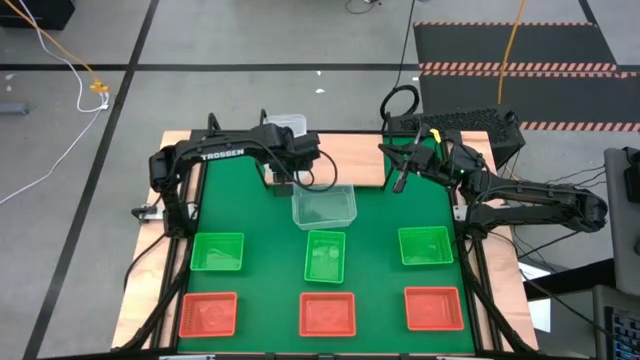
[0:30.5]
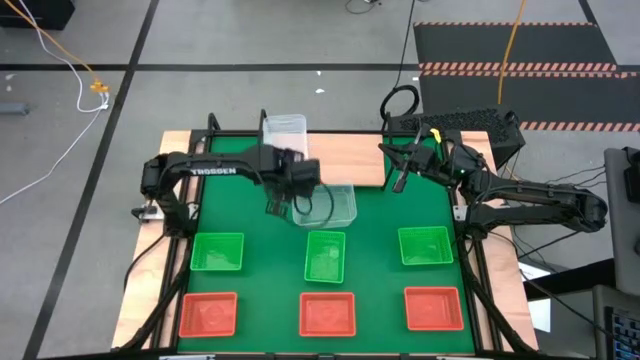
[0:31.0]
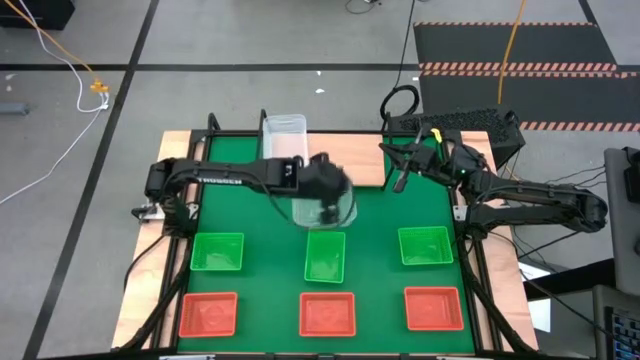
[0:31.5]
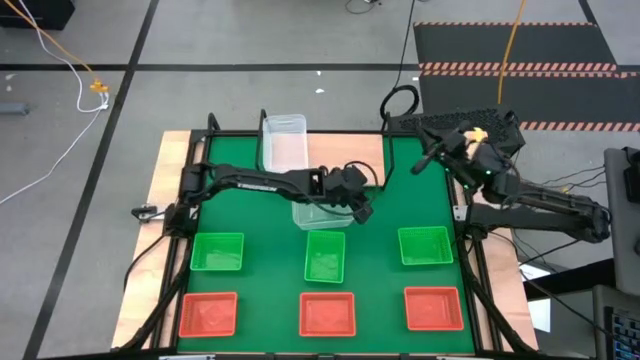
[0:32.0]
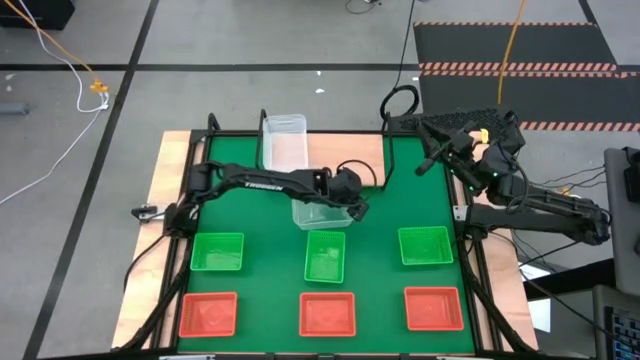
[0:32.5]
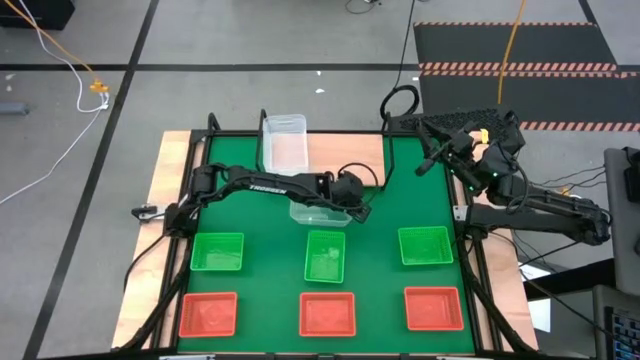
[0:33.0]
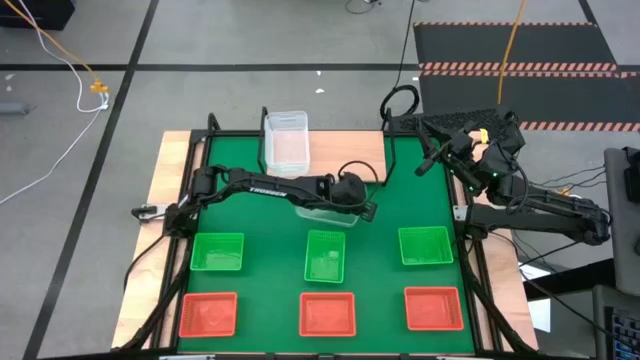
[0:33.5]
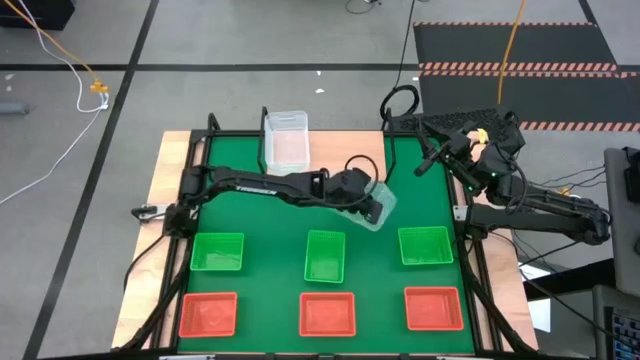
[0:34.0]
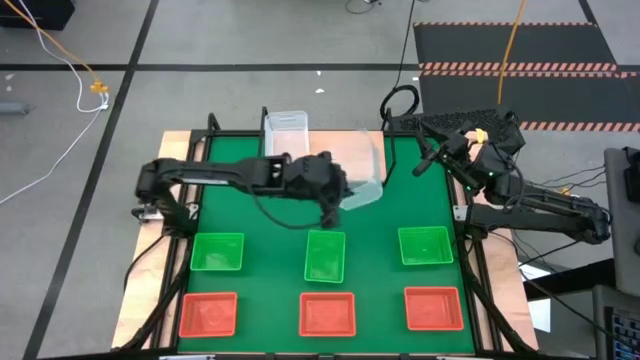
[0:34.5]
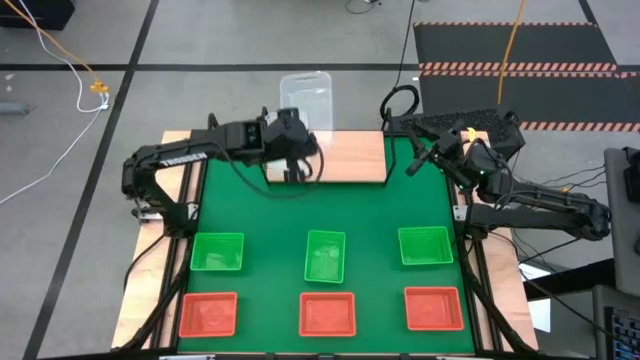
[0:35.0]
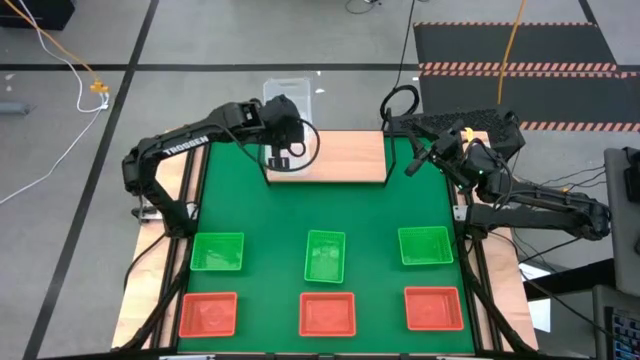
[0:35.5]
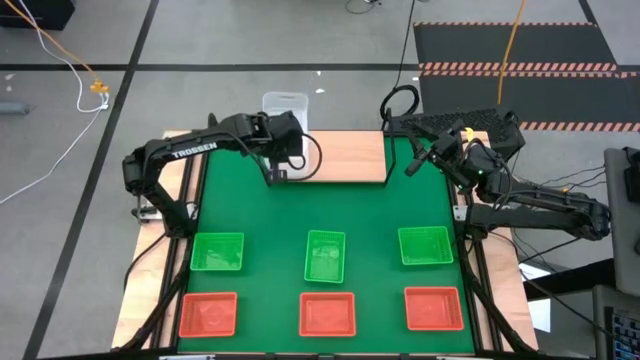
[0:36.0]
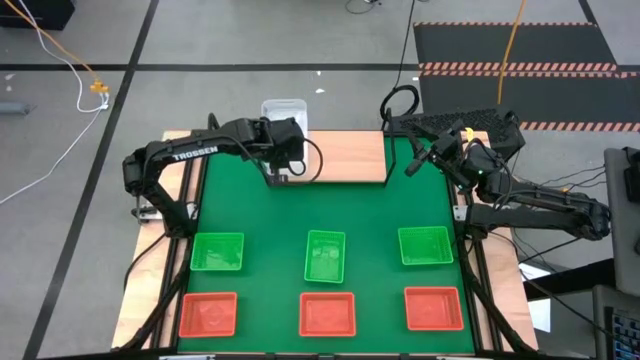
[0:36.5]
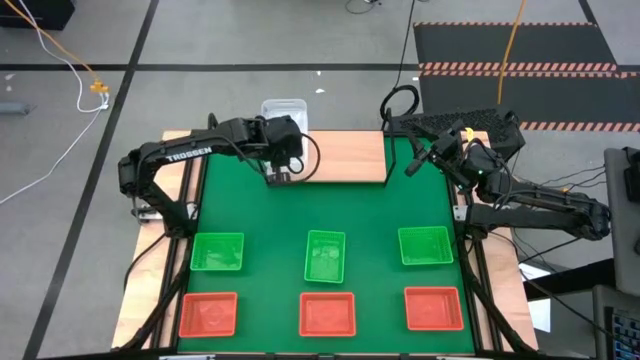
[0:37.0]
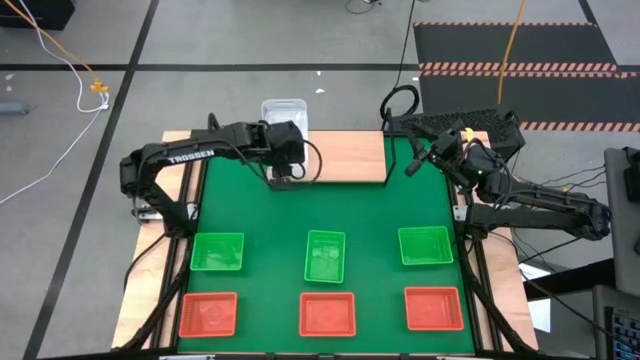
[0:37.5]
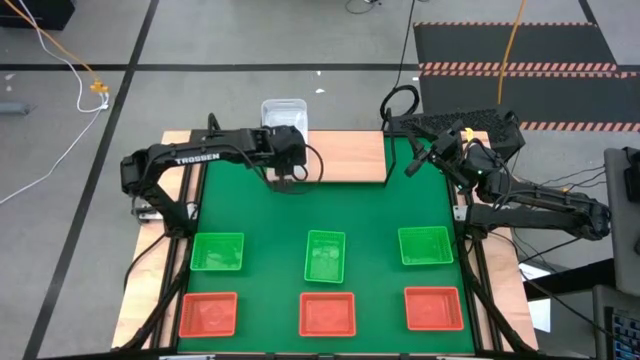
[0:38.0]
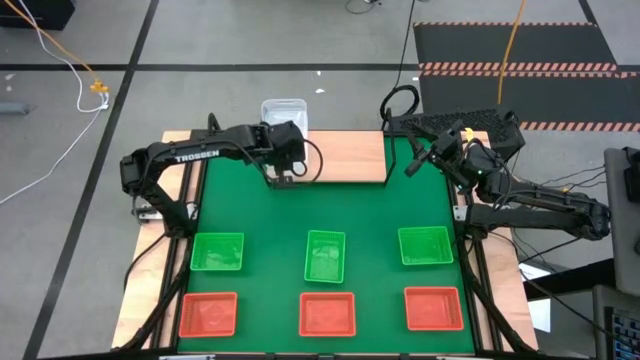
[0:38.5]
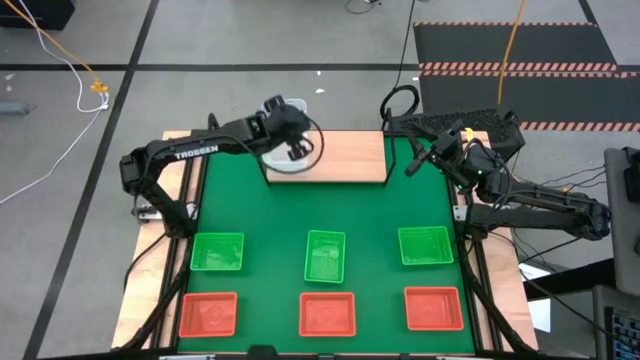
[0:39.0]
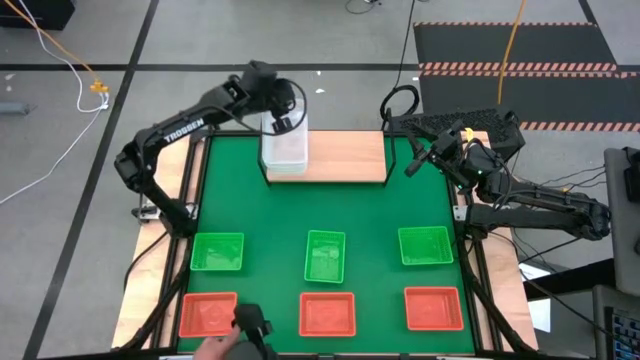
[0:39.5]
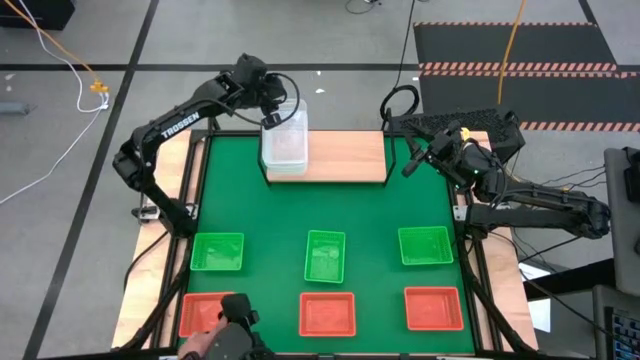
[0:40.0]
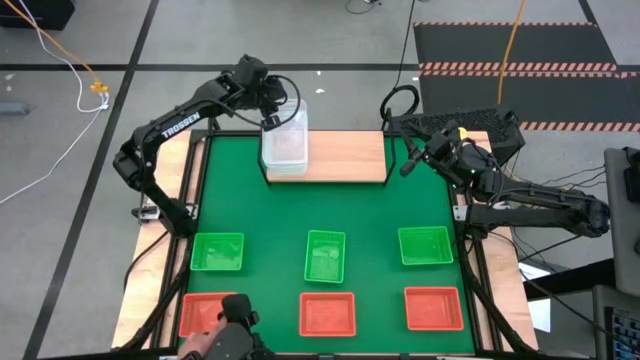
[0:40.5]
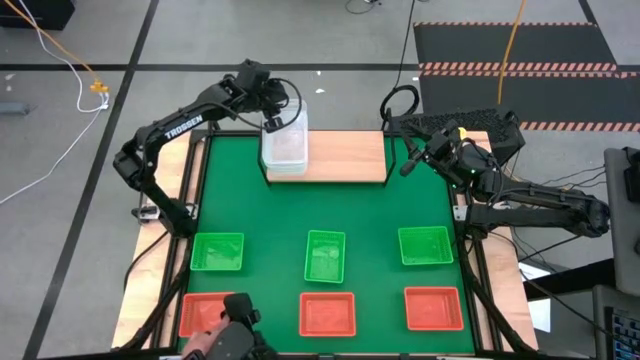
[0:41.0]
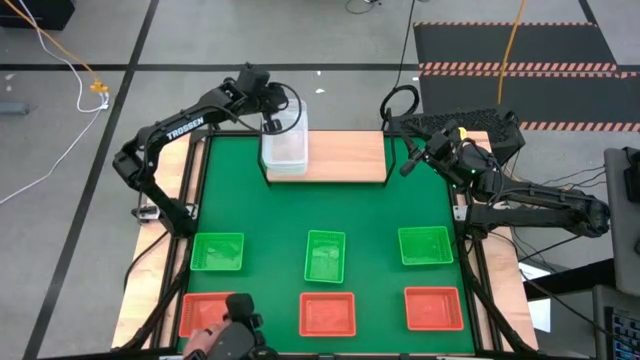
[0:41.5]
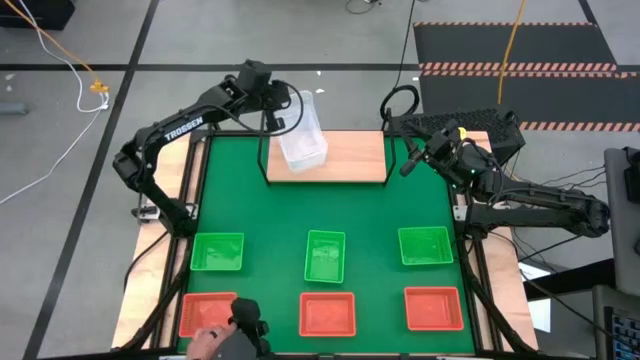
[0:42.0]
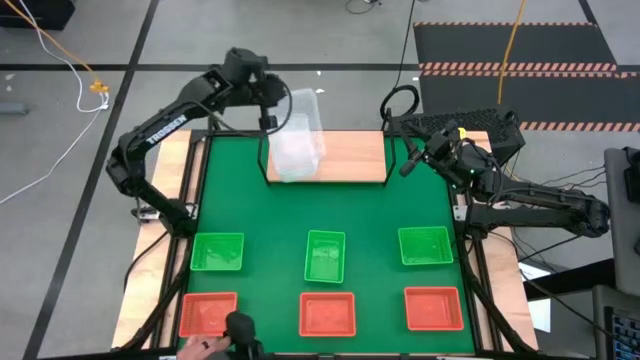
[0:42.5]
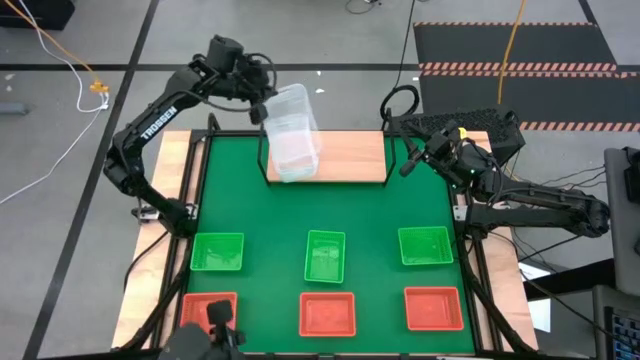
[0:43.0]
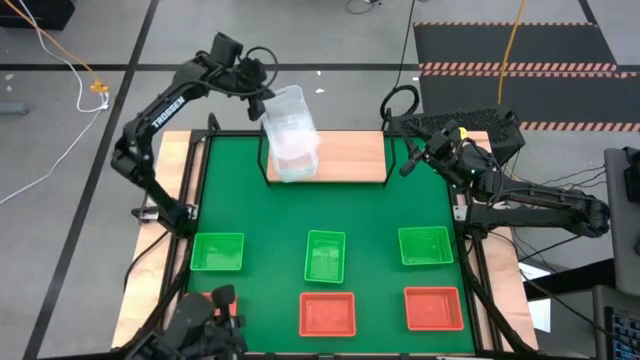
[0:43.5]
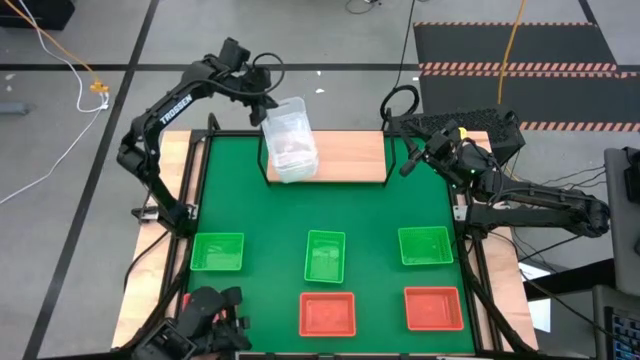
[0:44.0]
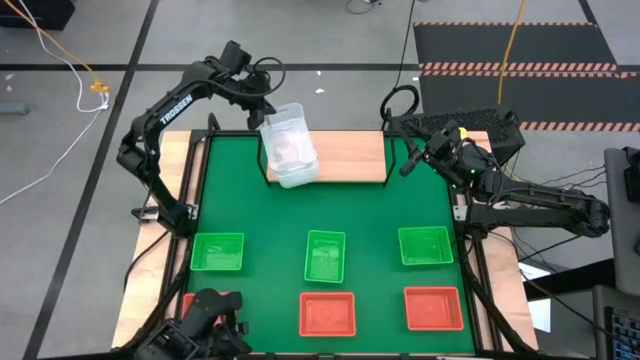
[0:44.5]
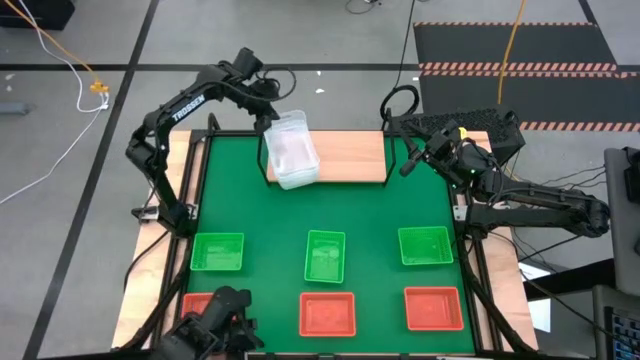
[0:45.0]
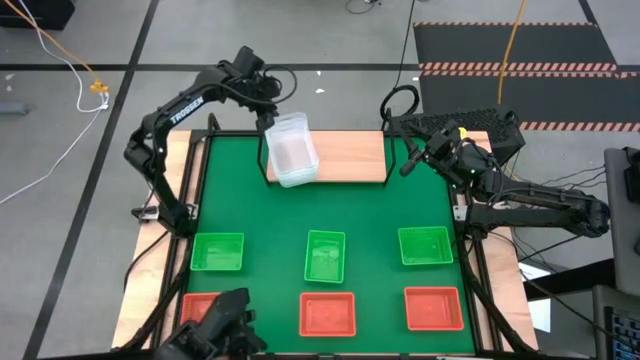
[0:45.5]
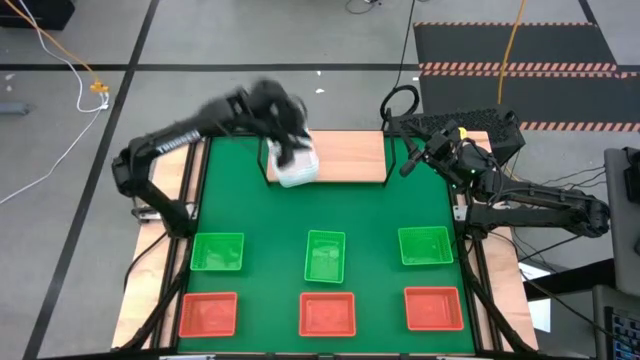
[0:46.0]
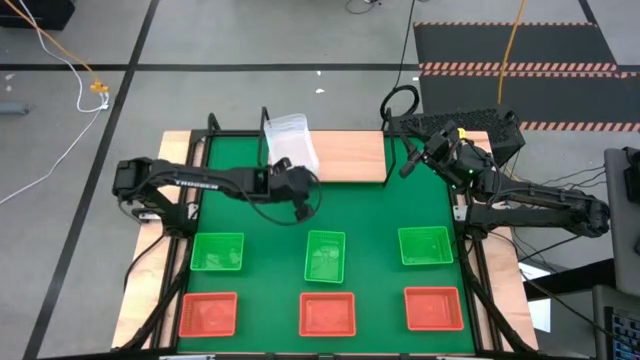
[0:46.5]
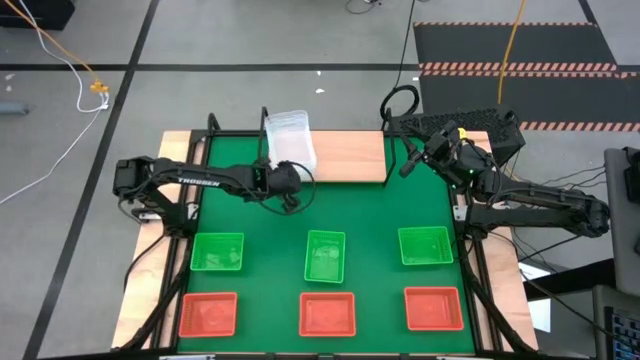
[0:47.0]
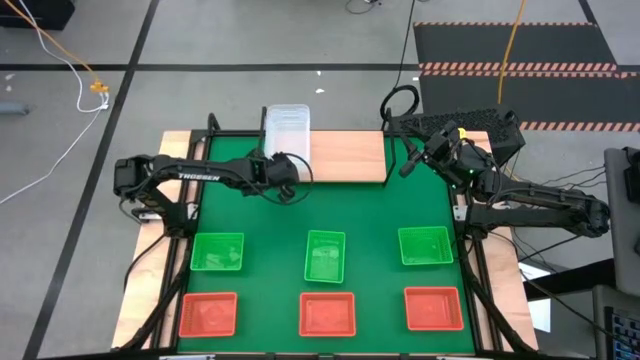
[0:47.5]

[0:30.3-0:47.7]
Task: Stack baskets on shelf by color
Stack the transparent bin on the top of the other transparent bins on the shelf

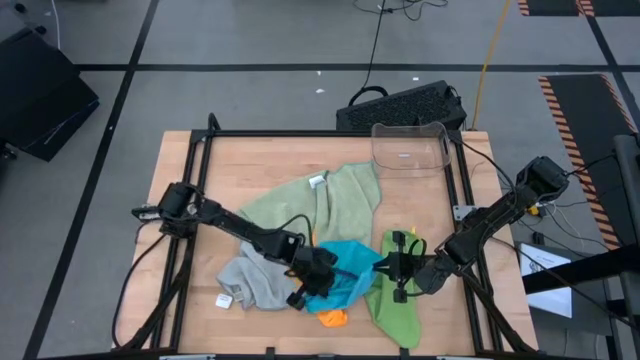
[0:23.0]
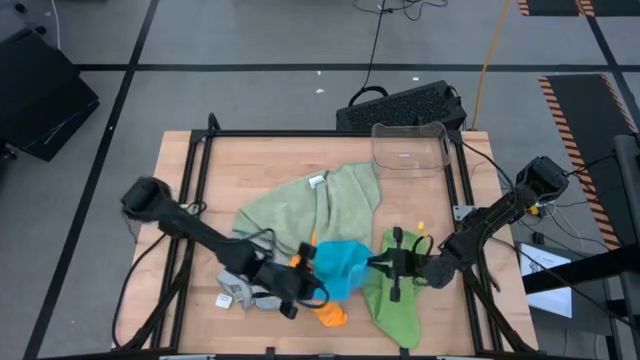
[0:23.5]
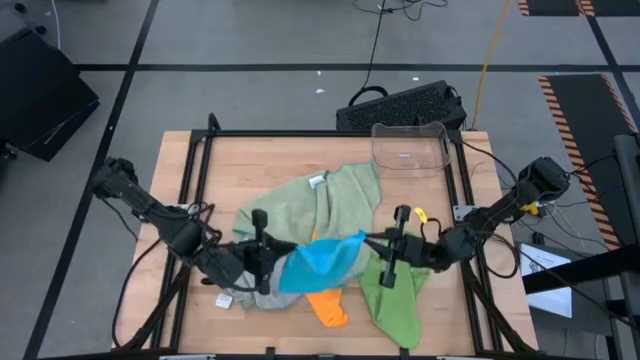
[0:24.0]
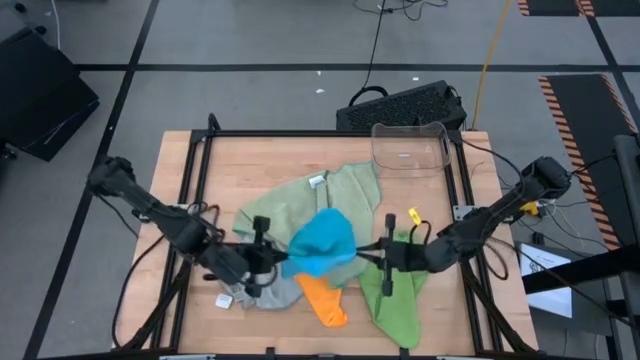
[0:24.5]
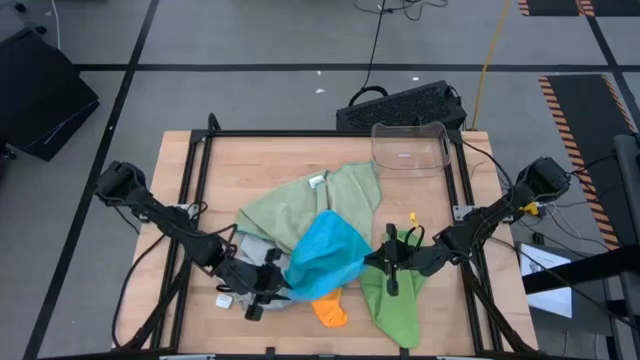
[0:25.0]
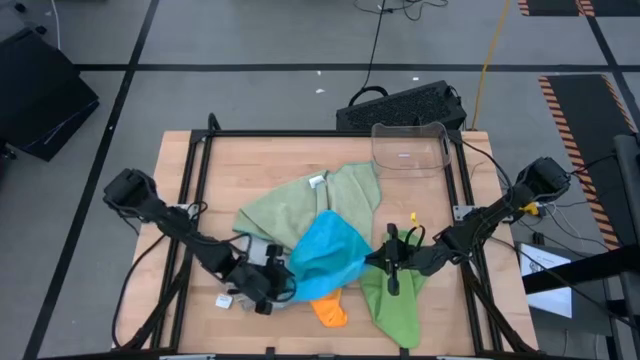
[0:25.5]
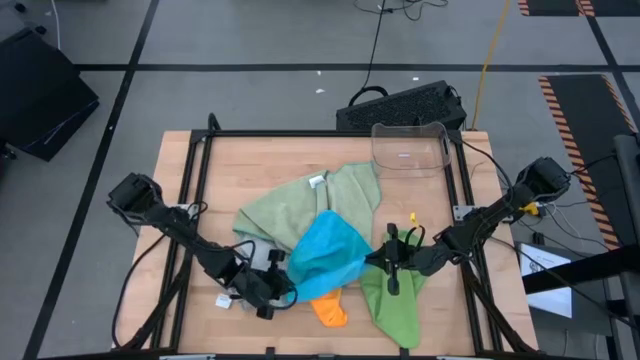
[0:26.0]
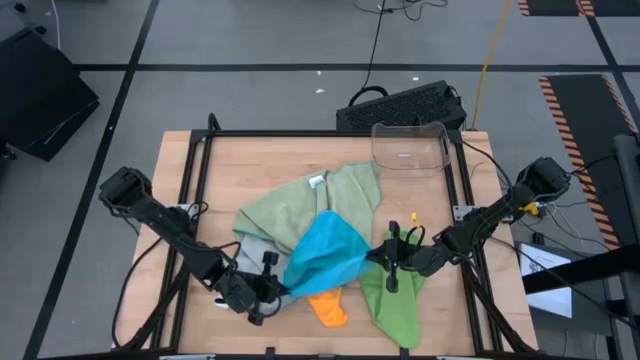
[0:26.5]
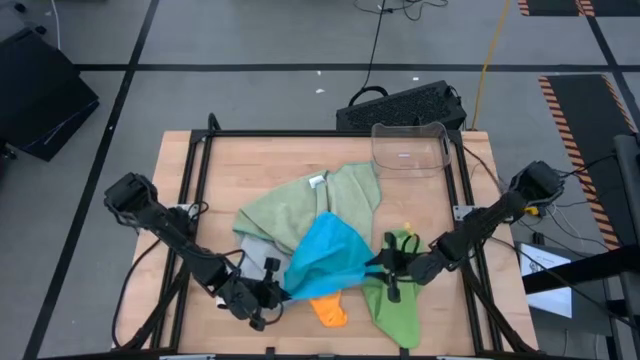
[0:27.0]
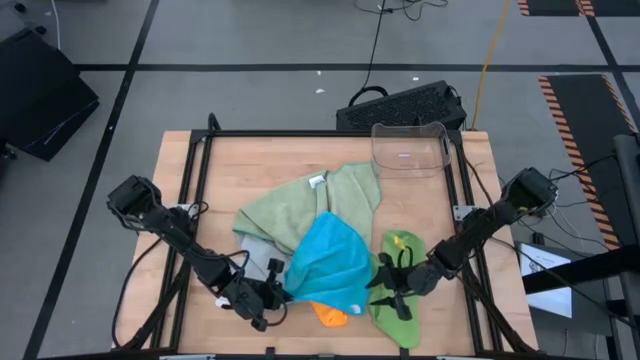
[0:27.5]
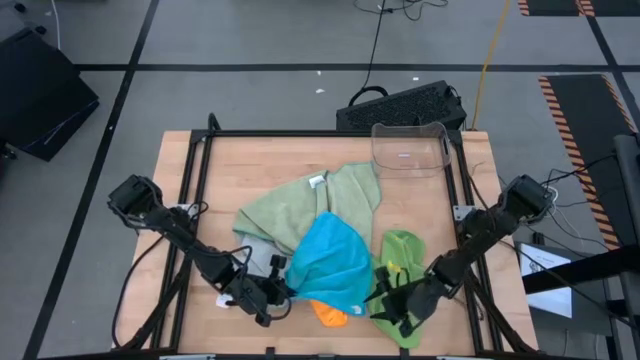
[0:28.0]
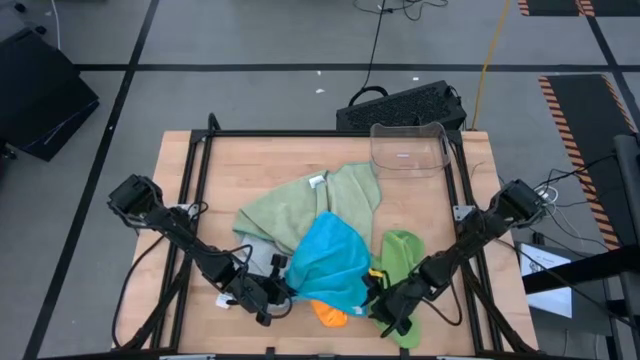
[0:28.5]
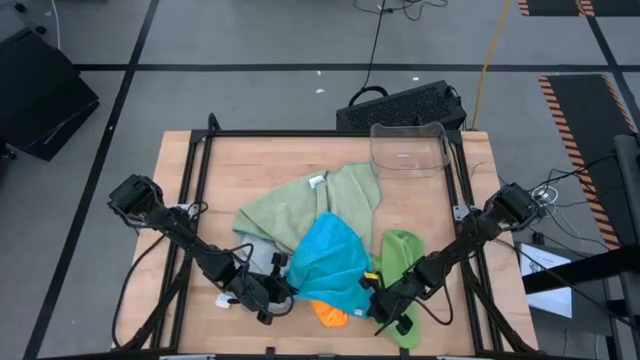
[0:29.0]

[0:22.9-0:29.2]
Task: Fold microfiber towels
Fold the blue microfiber towel
